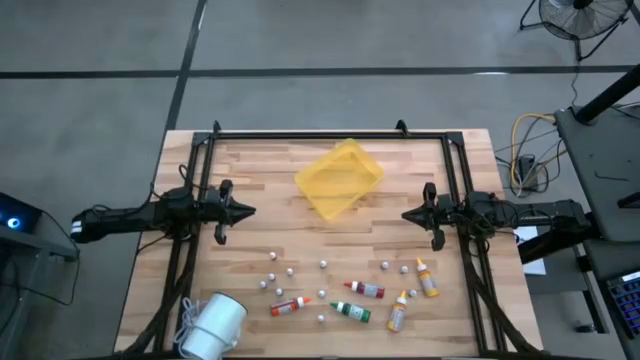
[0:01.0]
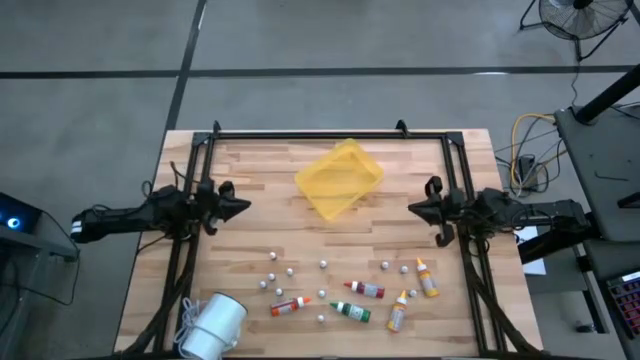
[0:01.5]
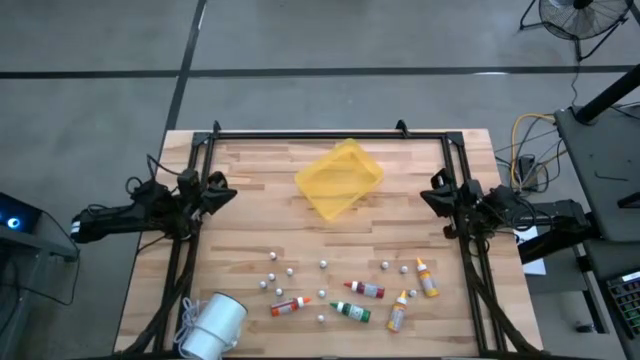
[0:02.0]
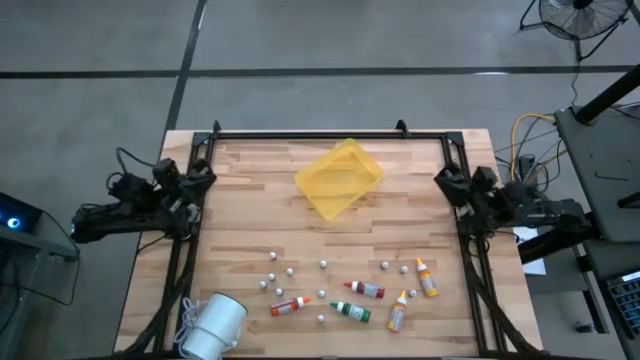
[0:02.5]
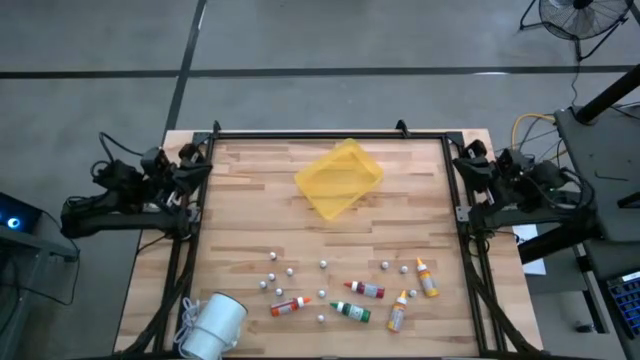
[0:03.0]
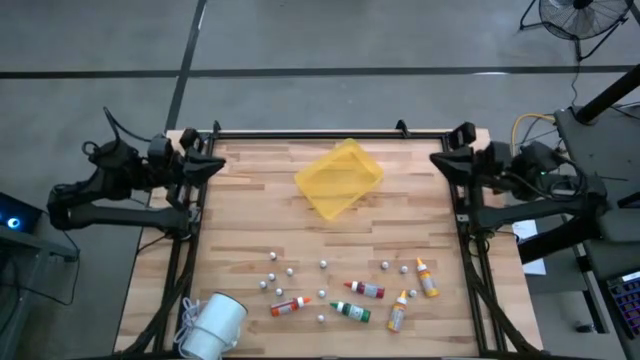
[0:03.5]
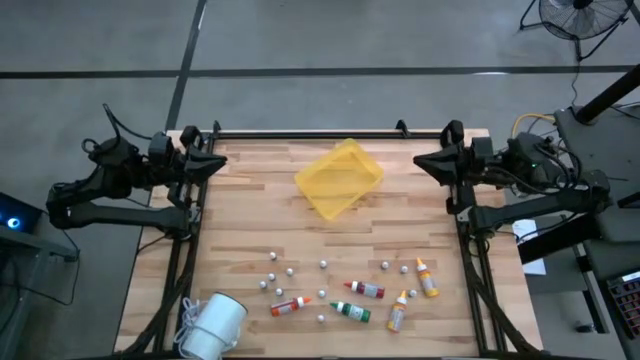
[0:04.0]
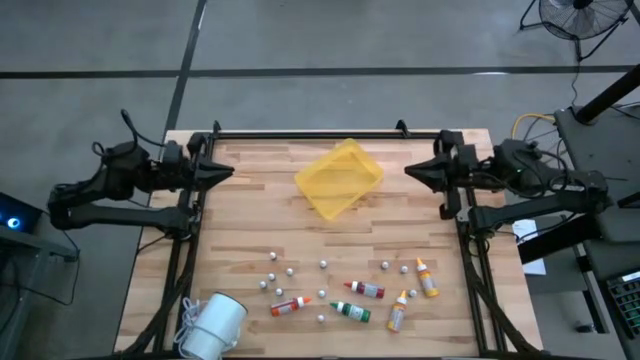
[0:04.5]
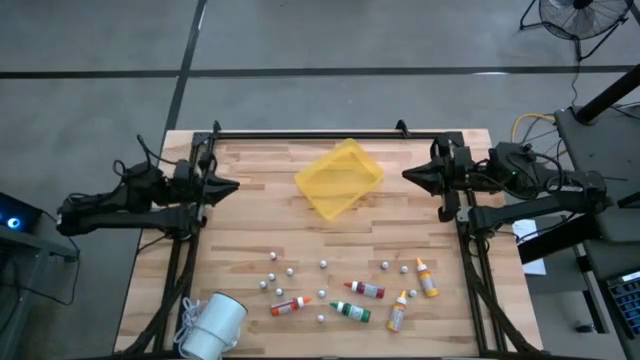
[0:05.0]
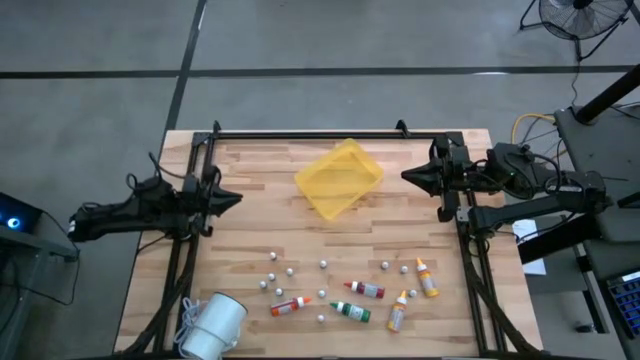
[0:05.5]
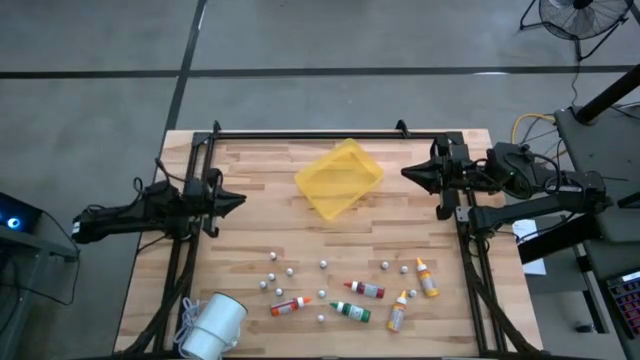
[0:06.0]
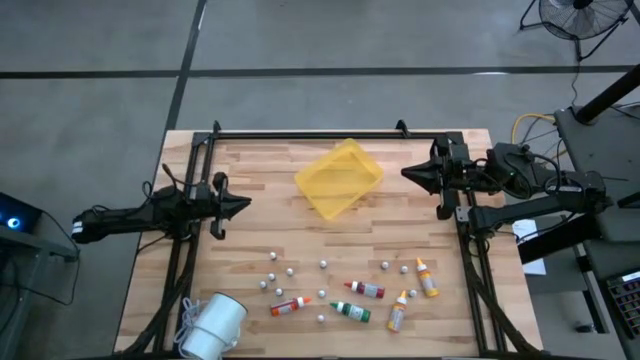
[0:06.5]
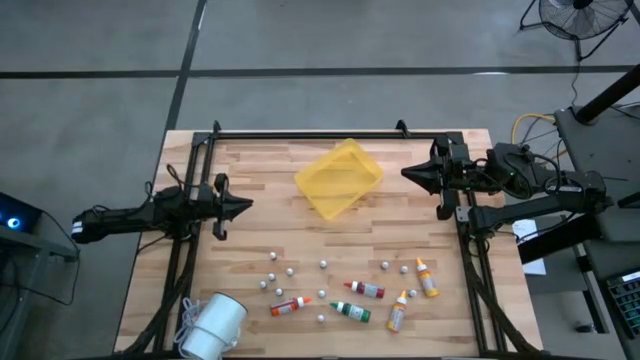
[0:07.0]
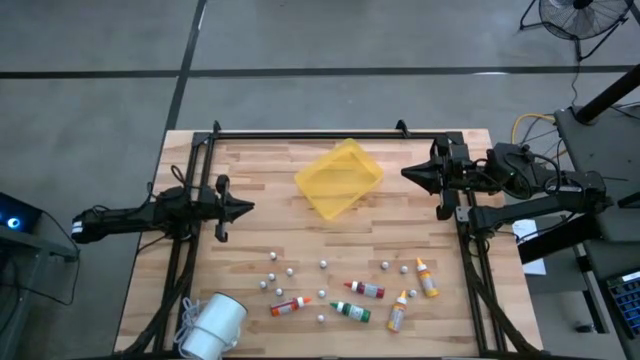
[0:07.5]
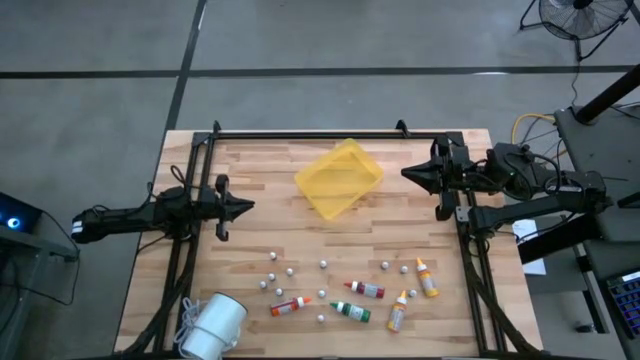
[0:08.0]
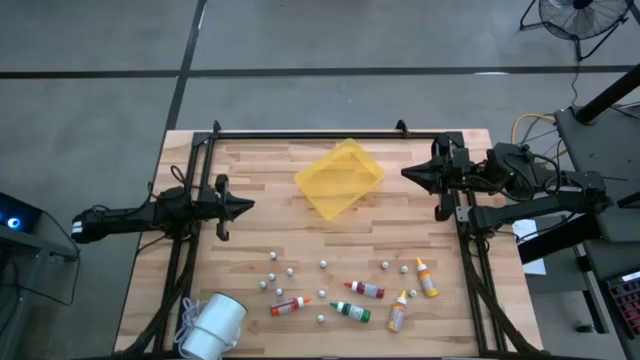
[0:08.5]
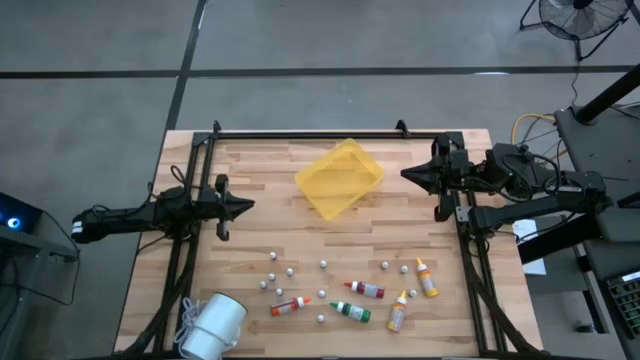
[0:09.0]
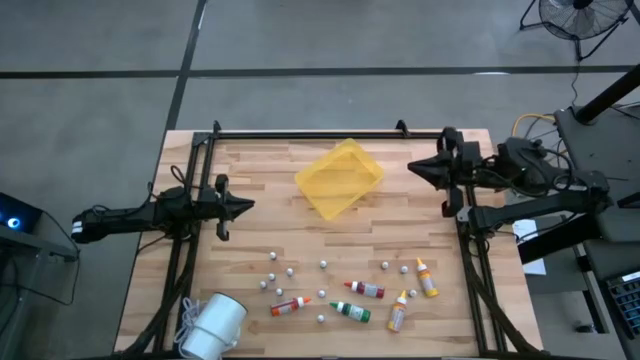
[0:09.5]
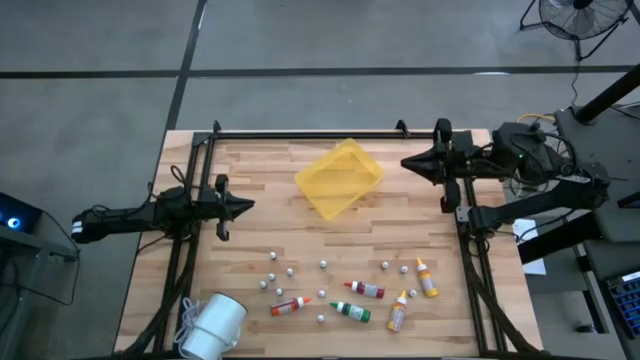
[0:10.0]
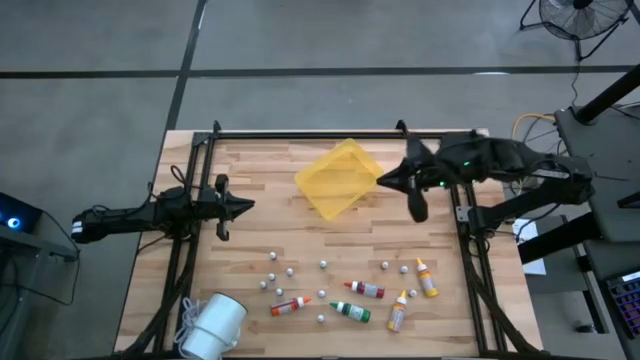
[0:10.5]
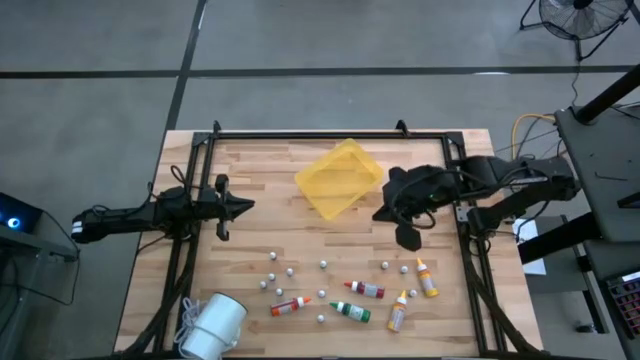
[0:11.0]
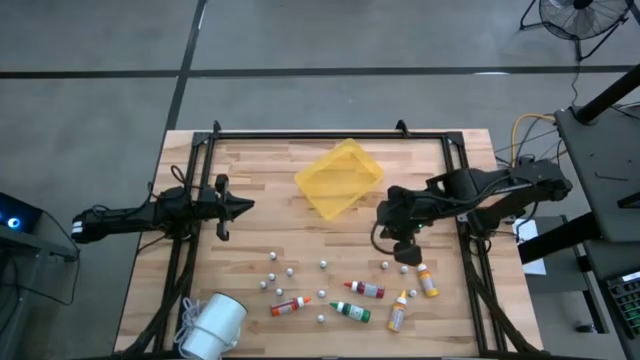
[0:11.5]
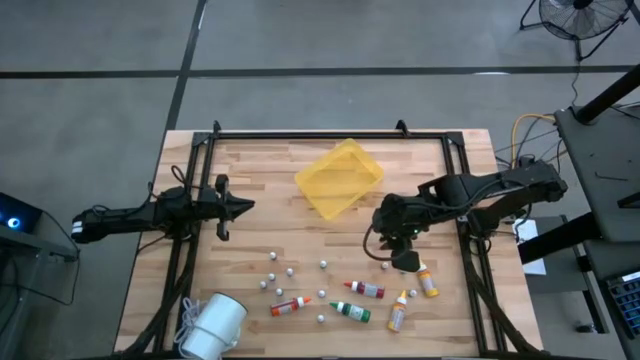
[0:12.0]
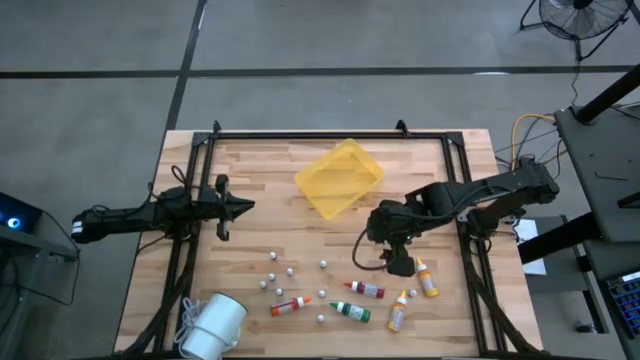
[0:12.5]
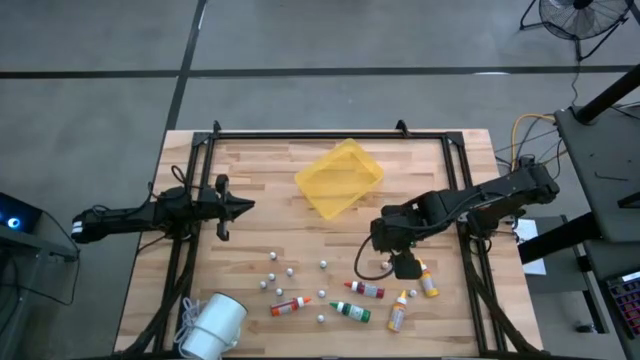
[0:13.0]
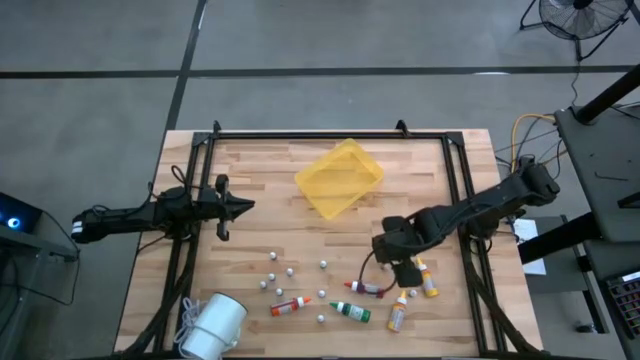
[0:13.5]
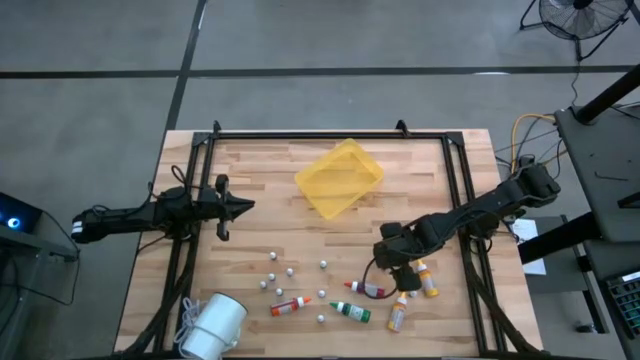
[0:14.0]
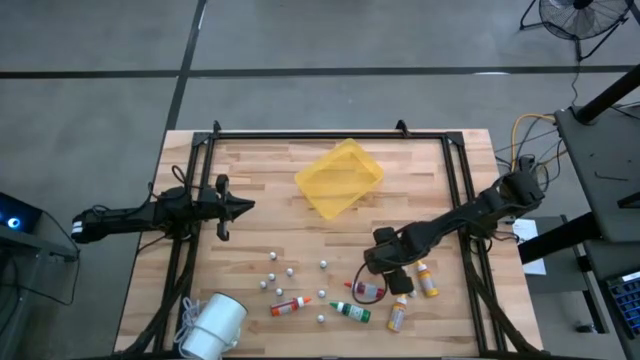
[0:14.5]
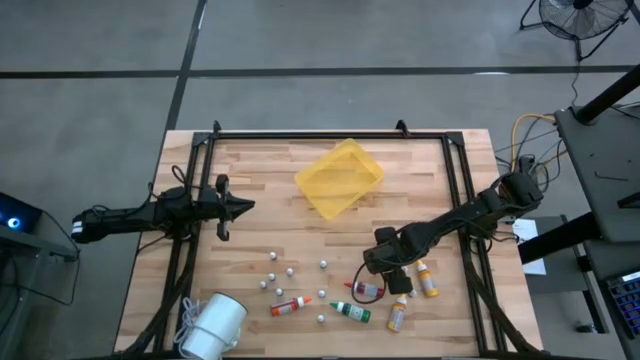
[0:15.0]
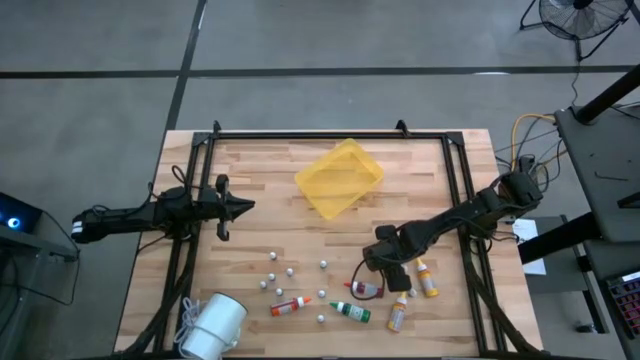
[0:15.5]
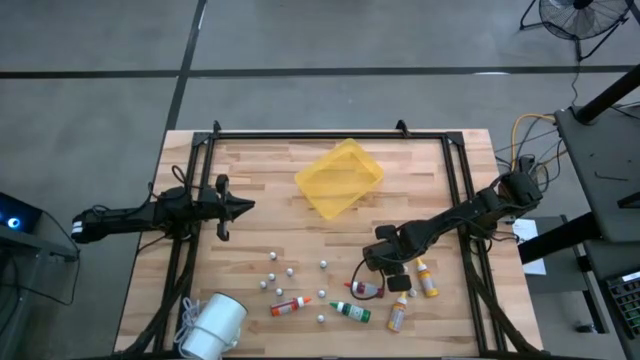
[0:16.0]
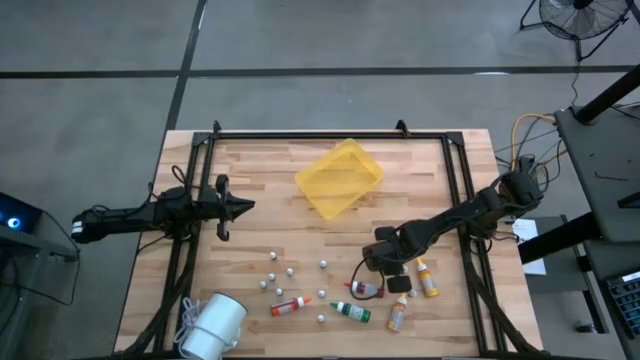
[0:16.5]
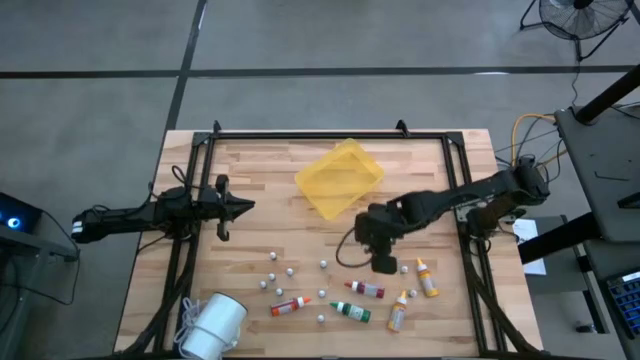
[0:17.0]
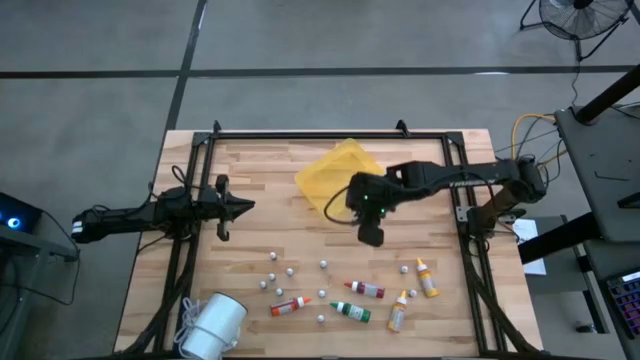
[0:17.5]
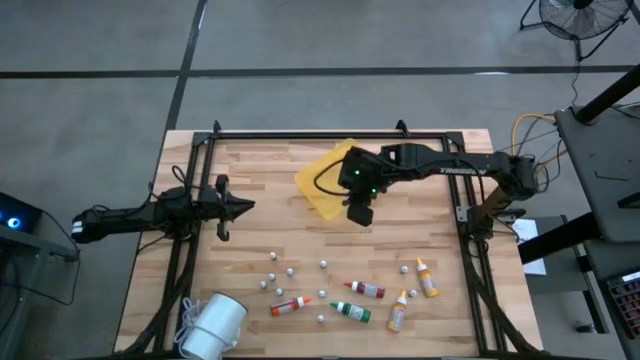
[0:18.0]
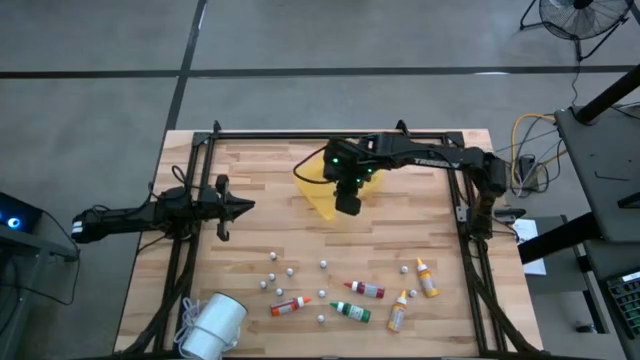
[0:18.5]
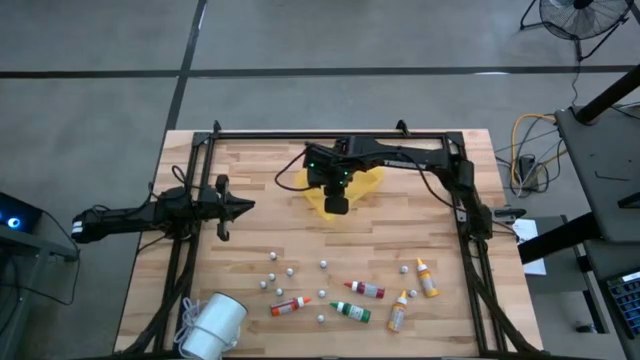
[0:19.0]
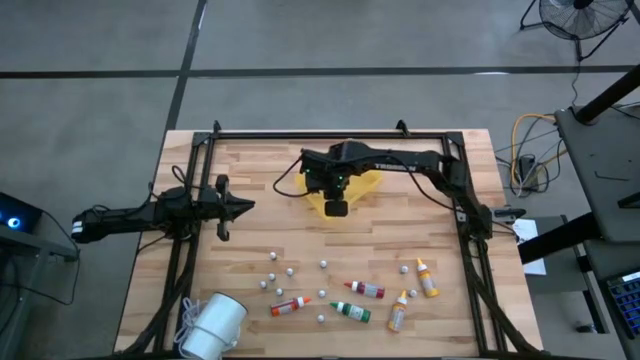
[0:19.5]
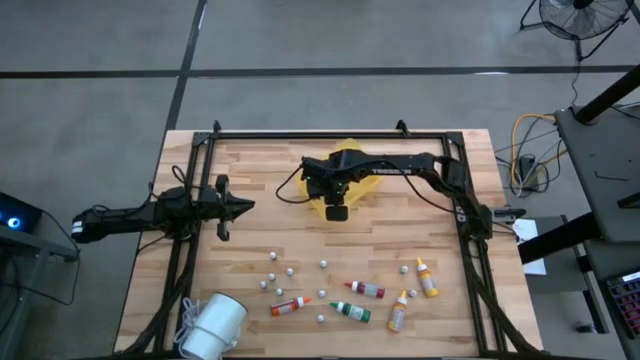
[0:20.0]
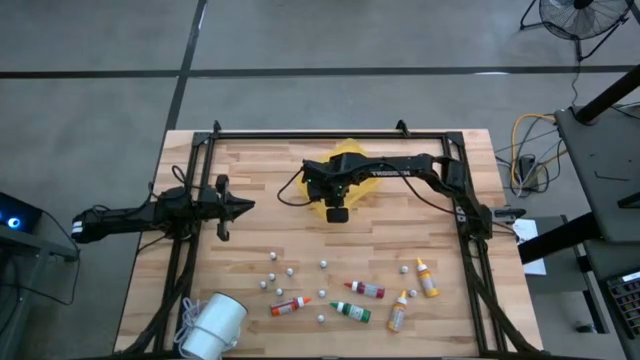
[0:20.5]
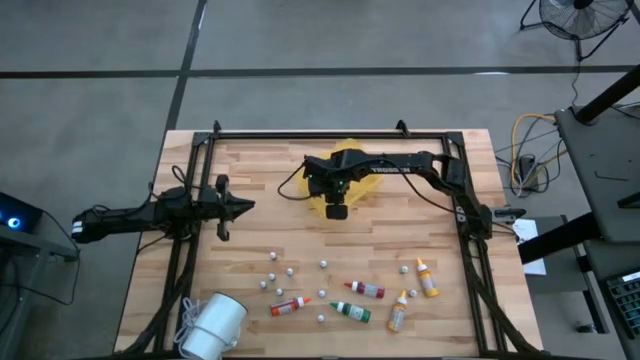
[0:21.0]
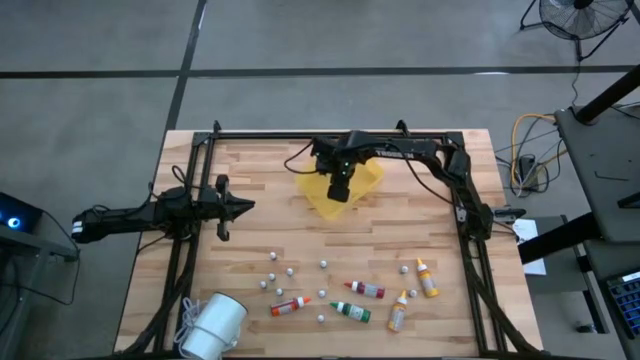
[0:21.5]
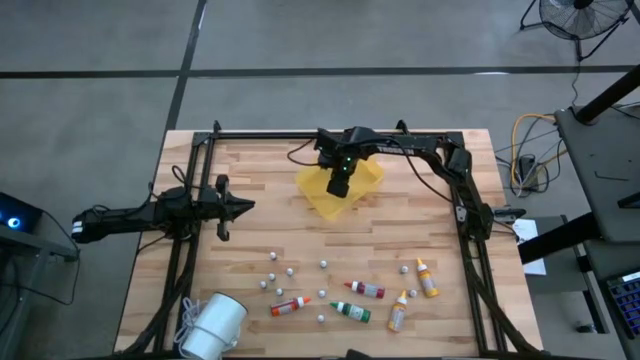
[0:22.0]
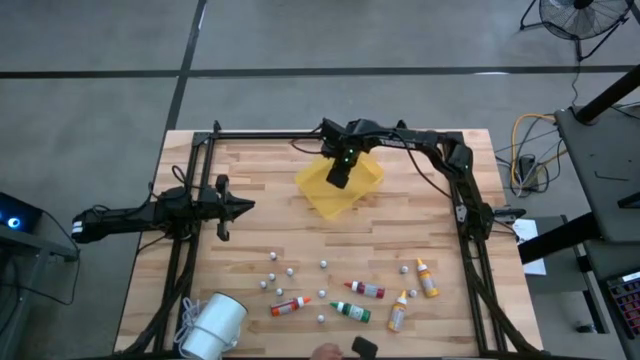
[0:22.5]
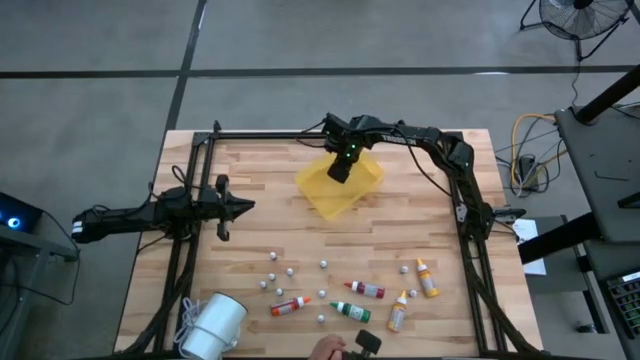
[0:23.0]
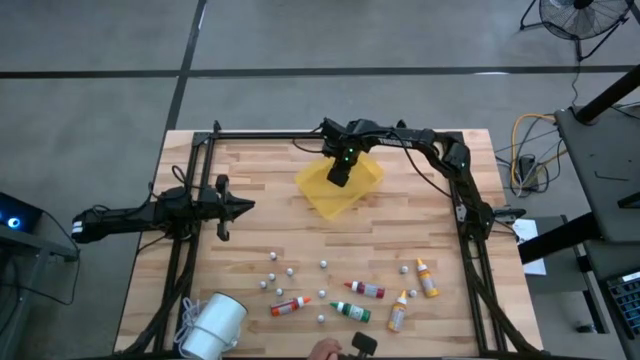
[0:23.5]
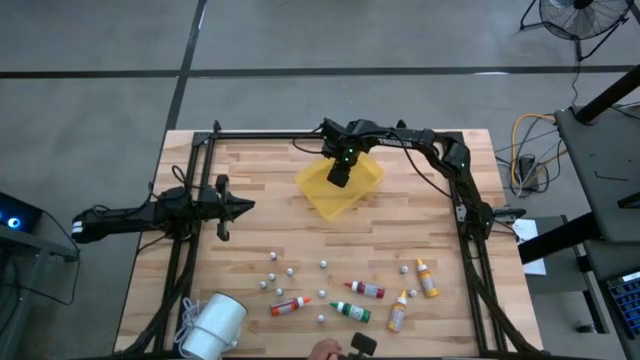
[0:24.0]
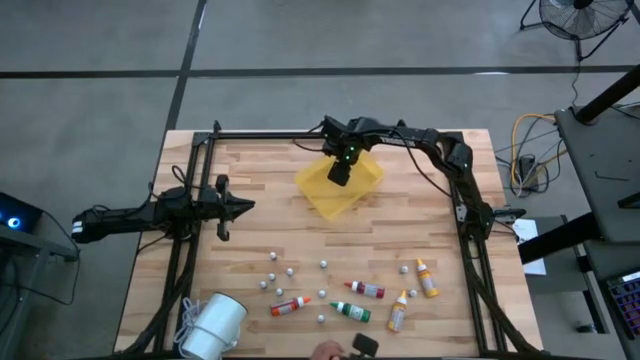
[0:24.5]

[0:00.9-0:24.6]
Task: Pick & Place food coloring
Put the small red food coloring bottle into the yellow bin
